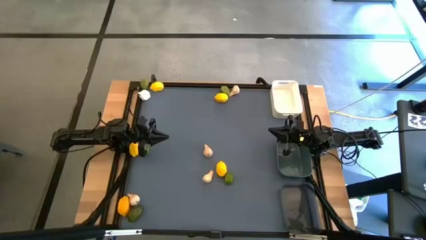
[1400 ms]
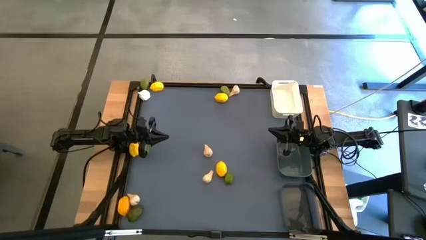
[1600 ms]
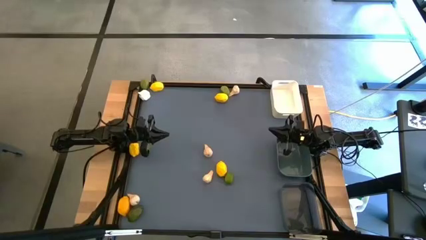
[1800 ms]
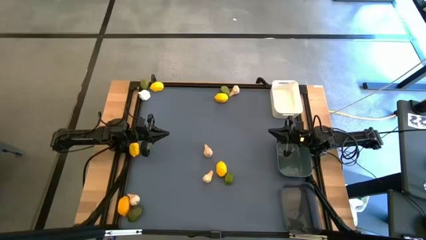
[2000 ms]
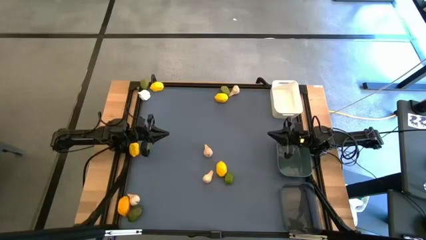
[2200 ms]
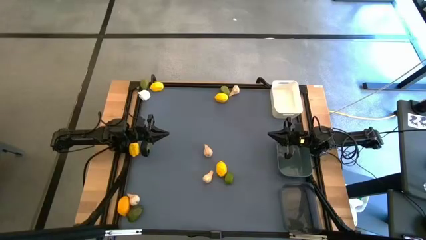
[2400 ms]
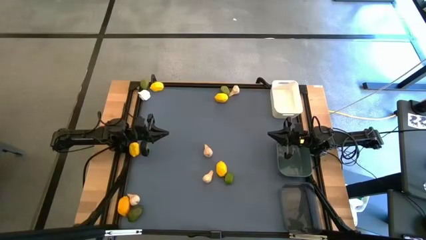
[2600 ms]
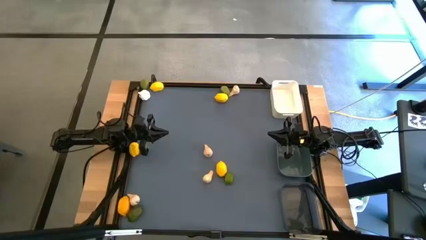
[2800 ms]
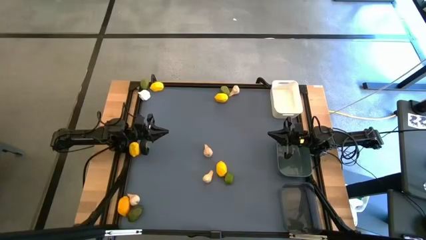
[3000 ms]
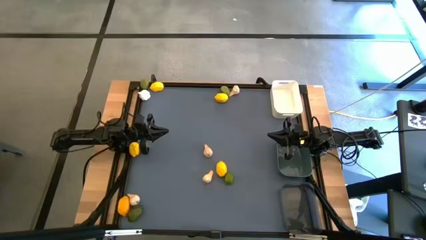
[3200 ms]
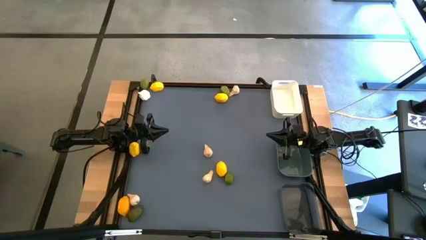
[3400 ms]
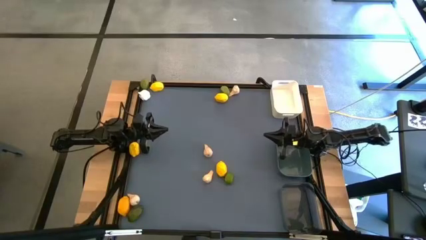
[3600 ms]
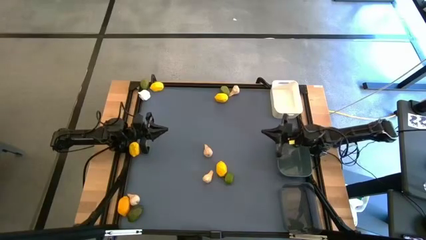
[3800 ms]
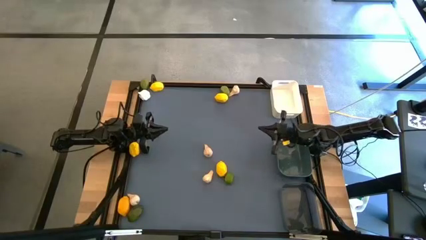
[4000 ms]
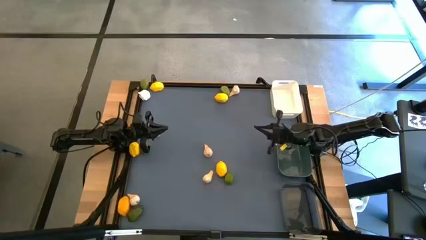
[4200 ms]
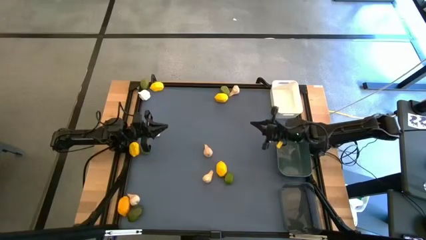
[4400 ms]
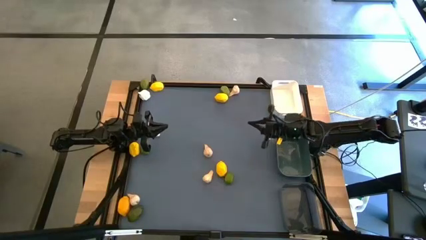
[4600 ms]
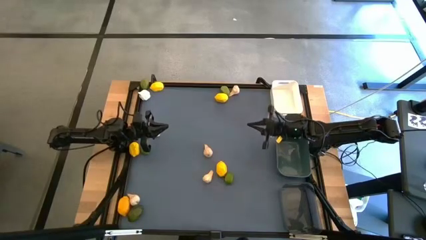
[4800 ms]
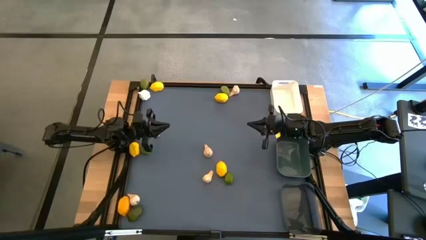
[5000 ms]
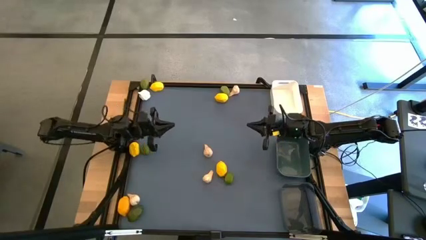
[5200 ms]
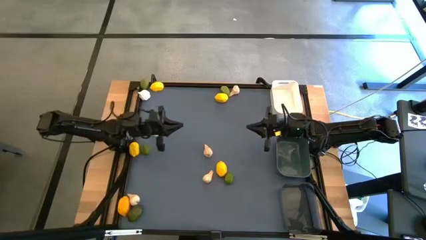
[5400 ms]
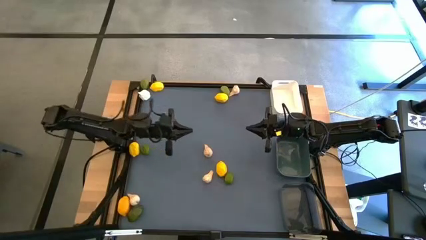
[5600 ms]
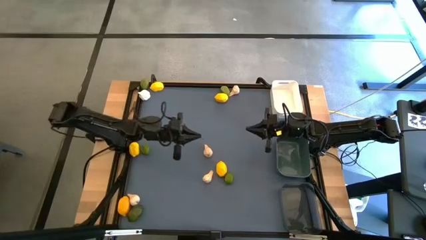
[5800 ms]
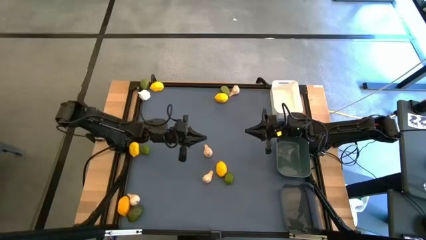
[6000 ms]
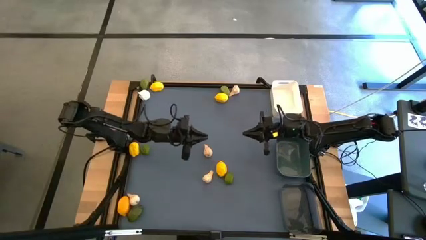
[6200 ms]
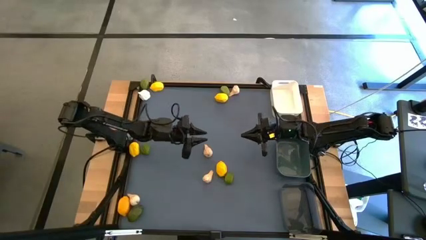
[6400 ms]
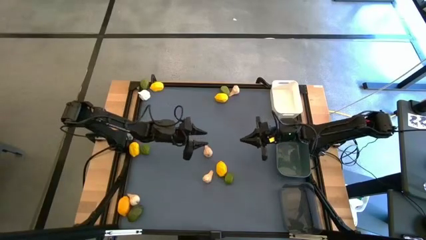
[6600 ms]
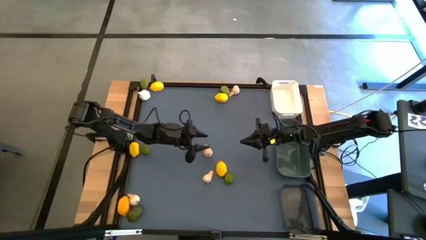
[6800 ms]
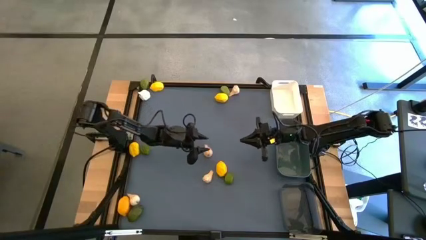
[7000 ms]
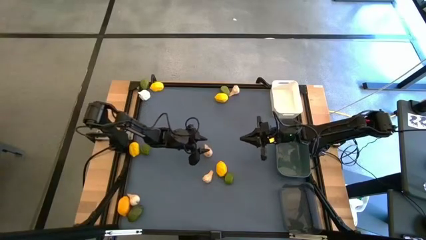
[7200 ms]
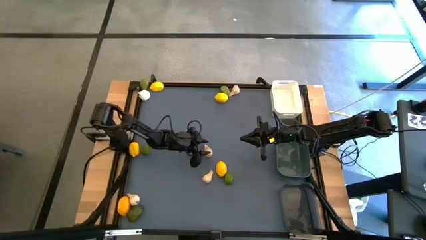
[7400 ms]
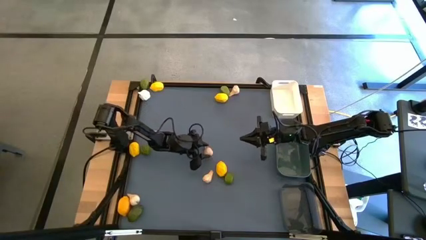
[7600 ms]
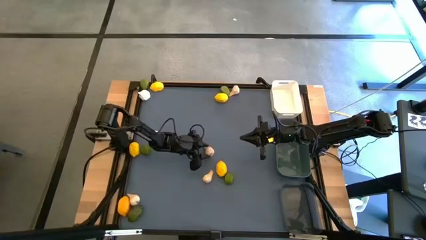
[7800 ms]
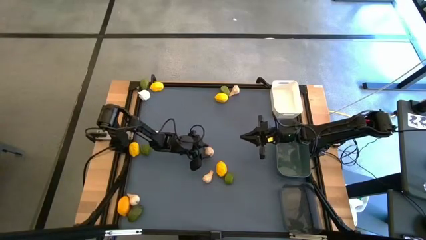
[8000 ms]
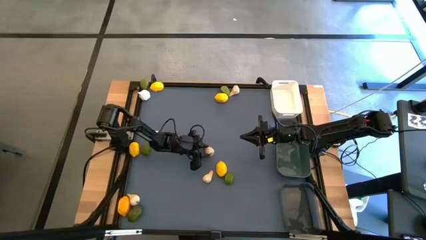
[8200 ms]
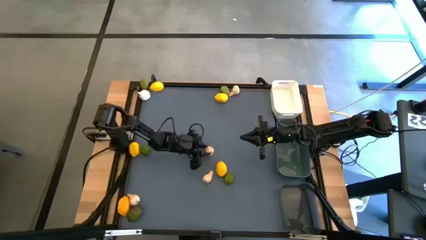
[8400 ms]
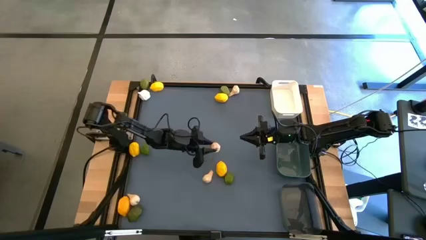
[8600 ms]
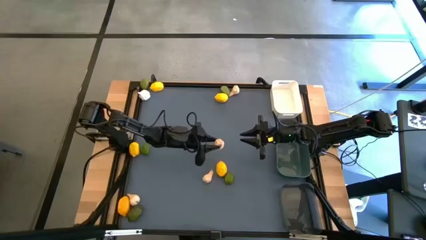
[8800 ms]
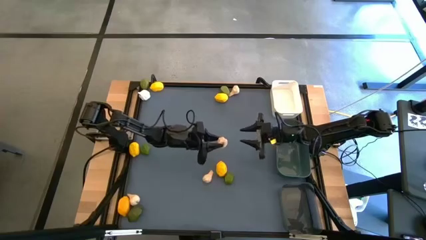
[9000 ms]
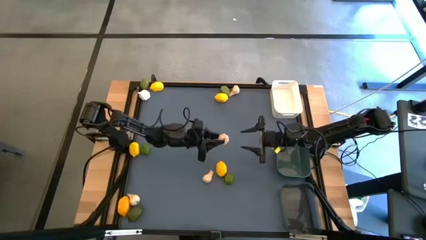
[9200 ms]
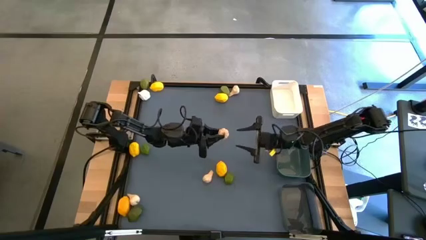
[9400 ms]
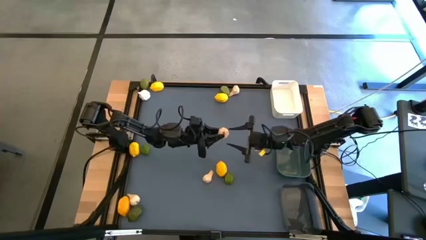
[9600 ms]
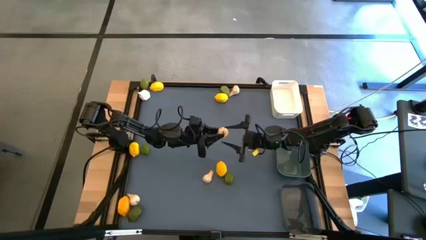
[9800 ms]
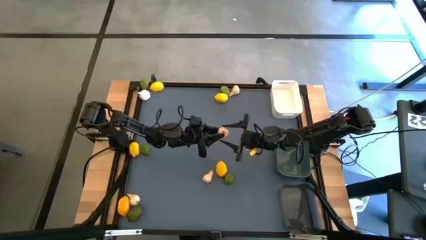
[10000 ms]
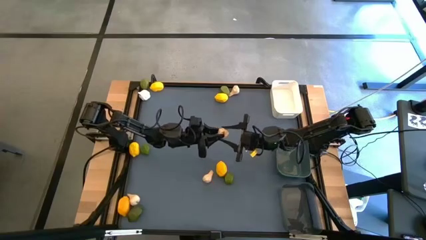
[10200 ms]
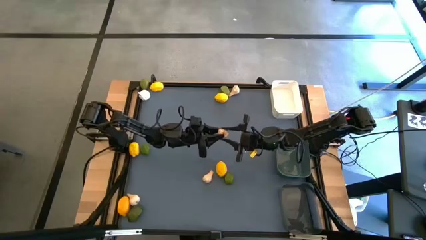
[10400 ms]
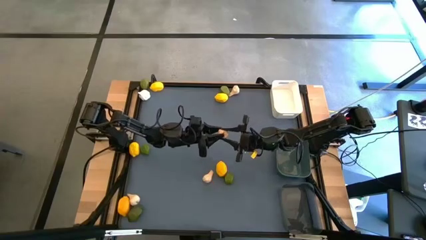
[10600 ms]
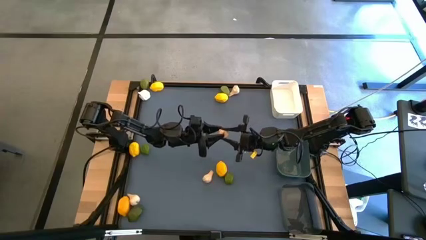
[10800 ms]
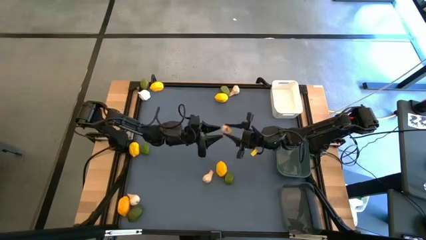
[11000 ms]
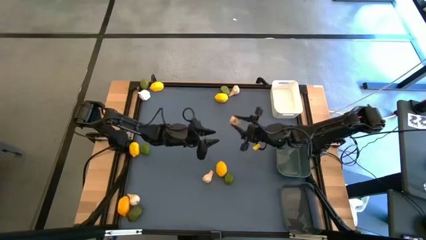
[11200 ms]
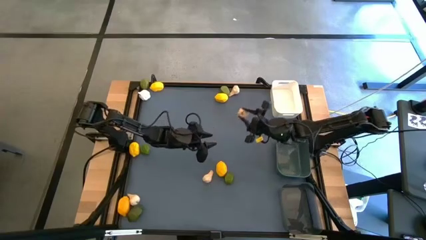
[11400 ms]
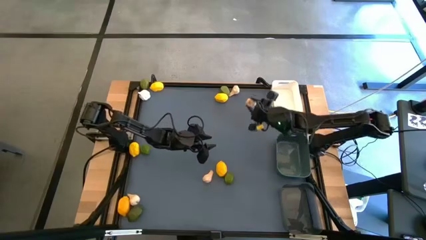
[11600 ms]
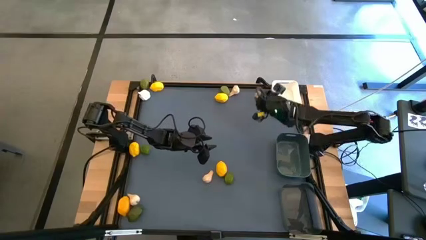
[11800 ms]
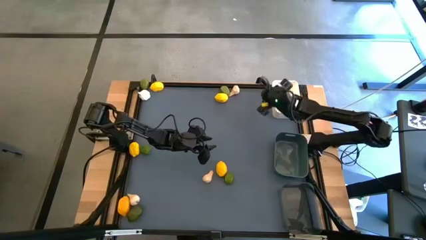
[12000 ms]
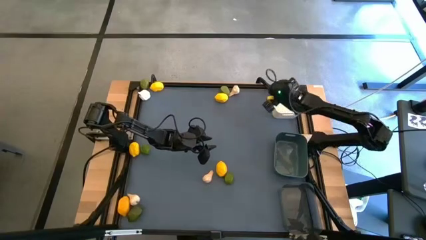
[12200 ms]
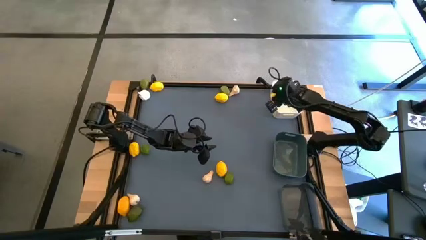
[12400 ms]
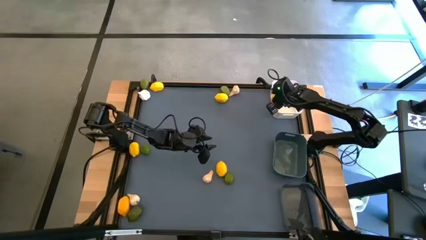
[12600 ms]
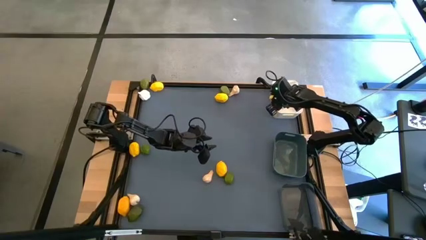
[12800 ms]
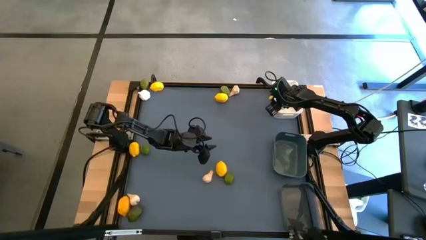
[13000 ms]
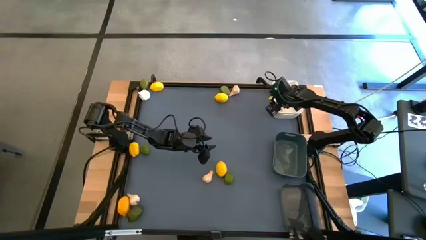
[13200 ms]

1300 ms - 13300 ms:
Task: Sort produce into baskets
Put the white garlic into the white bin

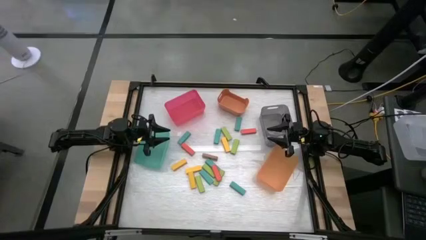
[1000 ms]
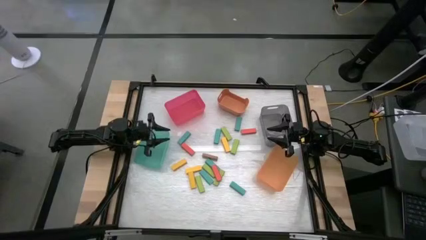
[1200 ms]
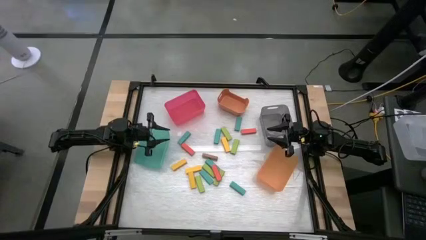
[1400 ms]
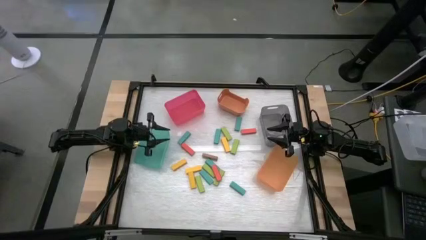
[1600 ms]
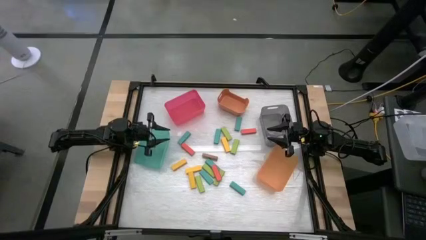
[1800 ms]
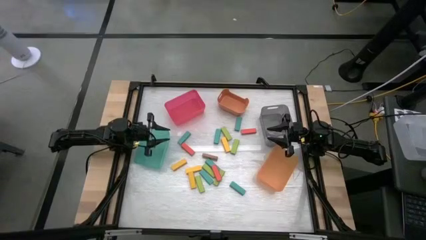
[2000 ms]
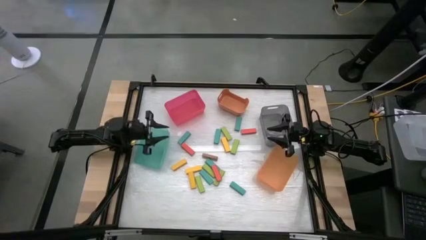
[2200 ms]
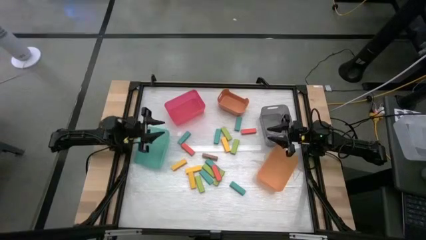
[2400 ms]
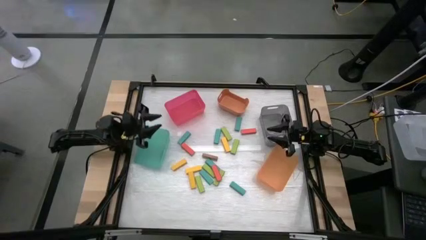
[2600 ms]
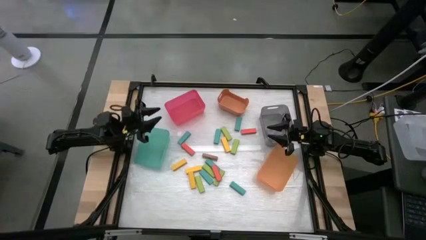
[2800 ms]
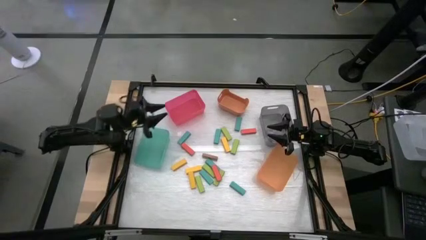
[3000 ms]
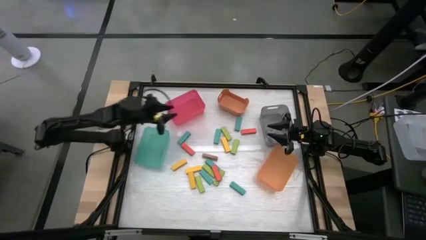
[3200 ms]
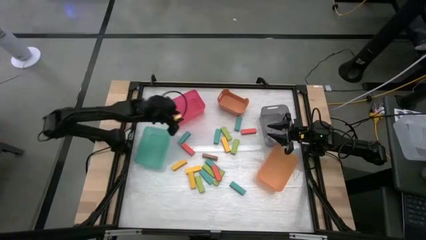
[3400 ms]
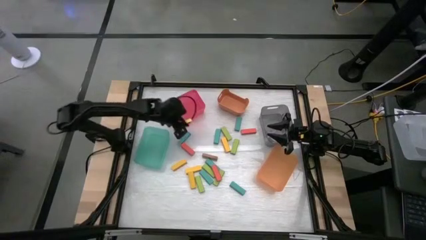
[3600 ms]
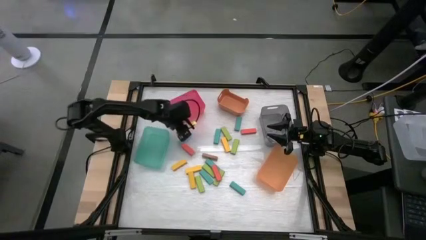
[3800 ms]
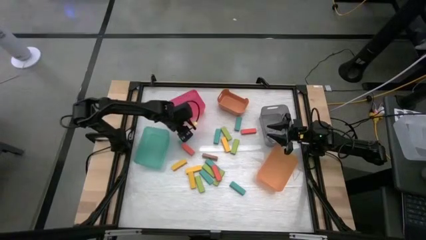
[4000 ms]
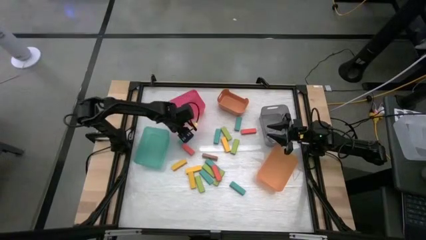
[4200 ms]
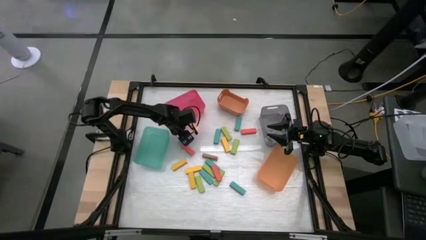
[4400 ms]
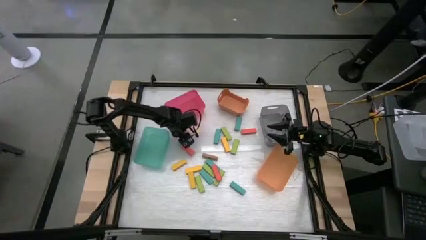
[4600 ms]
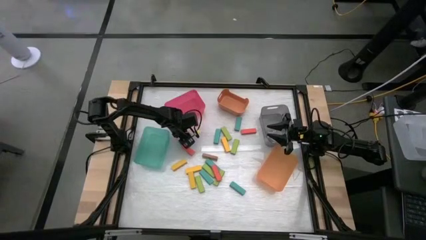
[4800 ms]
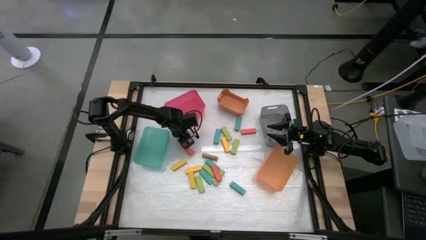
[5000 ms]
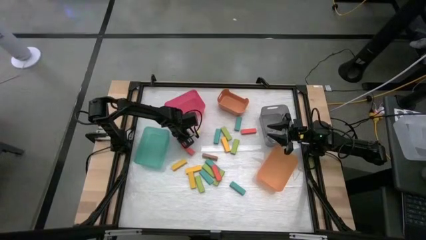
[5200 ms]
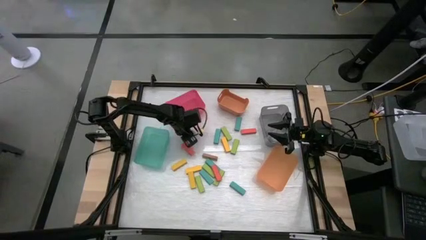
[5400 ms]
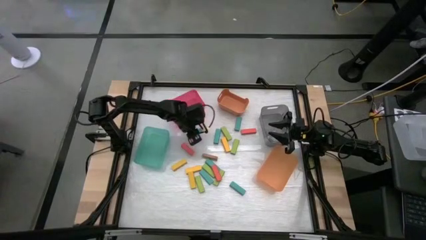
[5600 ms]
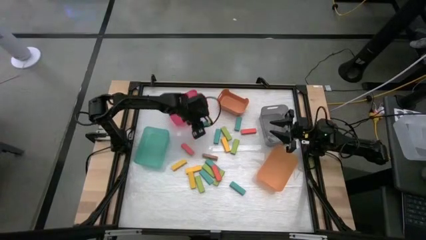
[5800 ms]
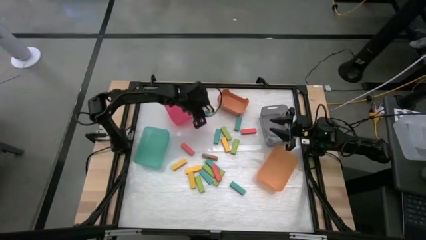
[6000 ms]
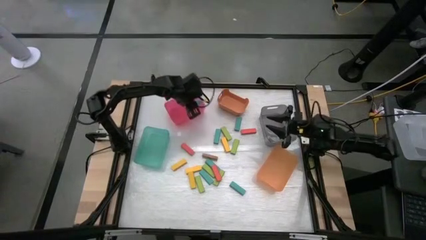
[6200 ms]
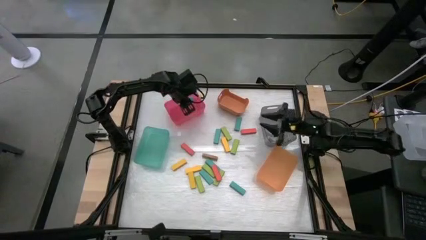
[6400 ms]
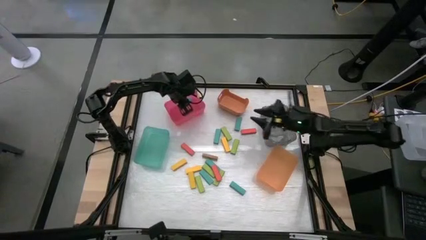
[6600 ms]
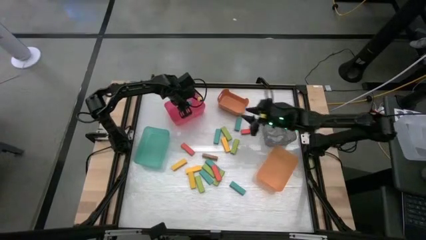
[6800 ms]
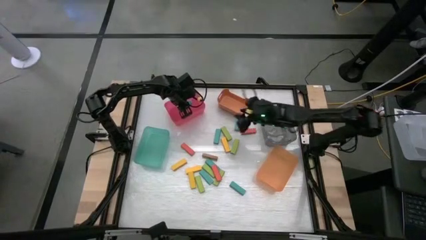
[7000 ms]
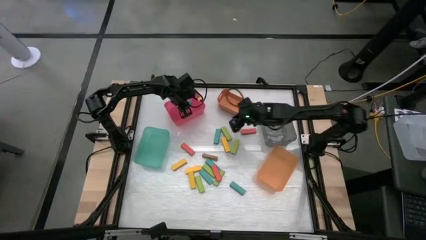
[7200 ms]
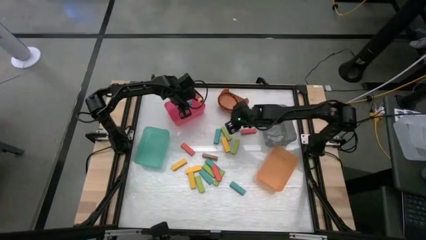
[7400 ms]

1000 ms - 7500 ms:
Task: Sort blocks
Put the blue block into the pink bin
